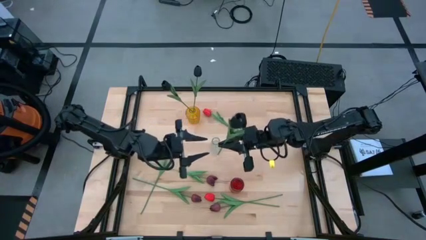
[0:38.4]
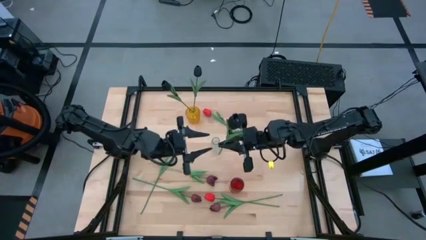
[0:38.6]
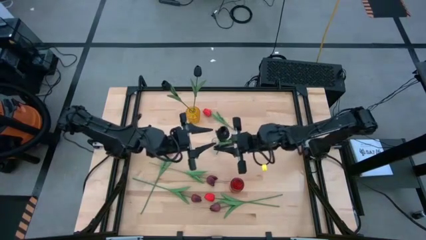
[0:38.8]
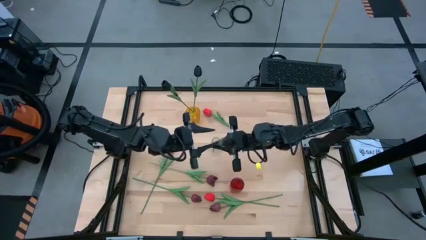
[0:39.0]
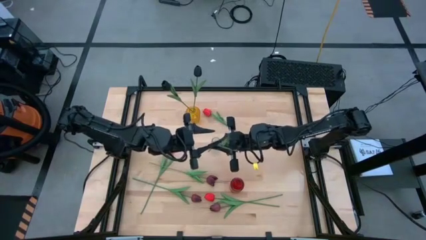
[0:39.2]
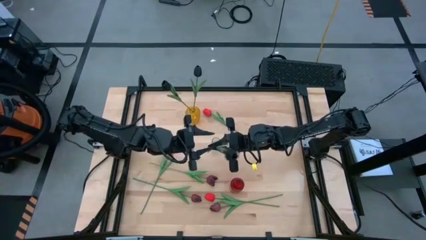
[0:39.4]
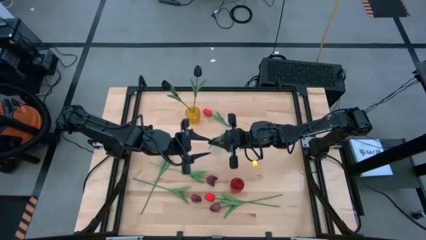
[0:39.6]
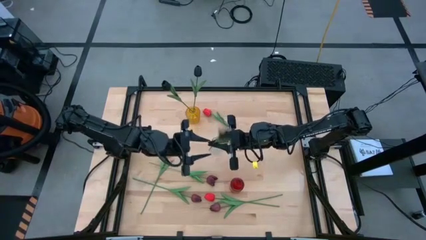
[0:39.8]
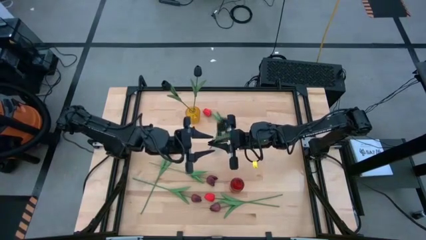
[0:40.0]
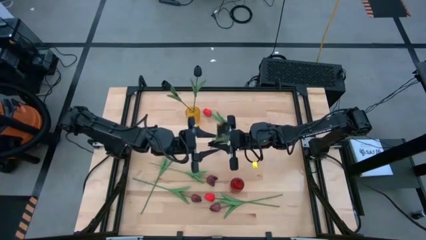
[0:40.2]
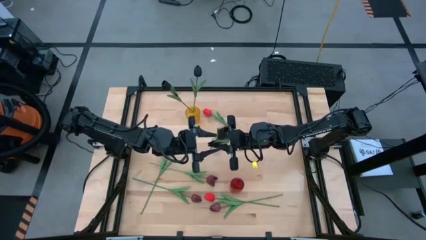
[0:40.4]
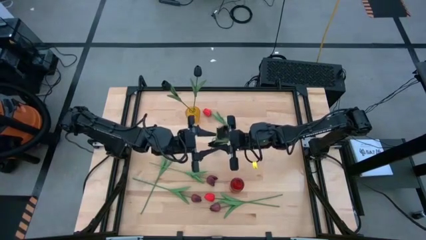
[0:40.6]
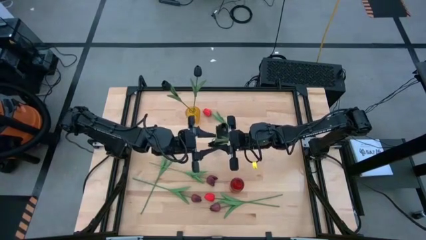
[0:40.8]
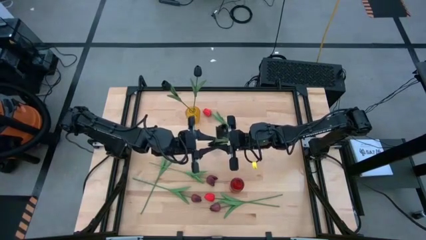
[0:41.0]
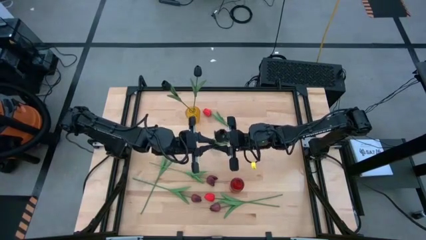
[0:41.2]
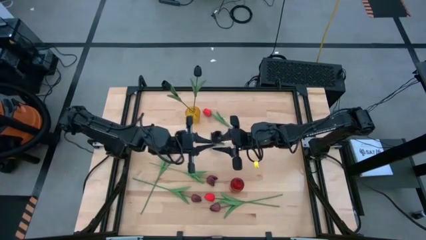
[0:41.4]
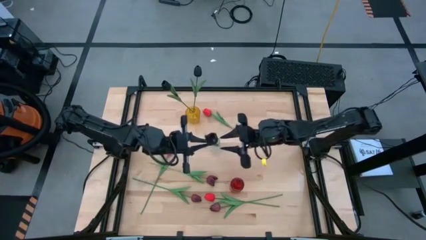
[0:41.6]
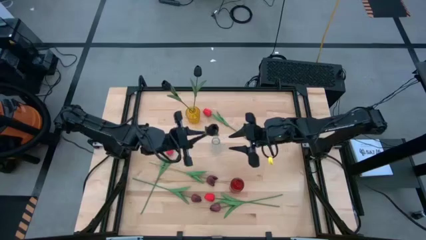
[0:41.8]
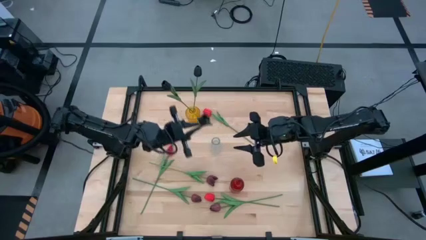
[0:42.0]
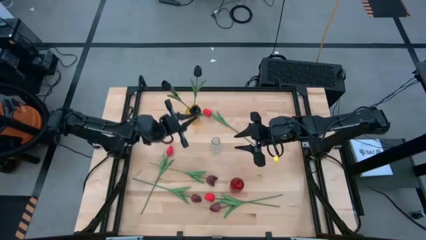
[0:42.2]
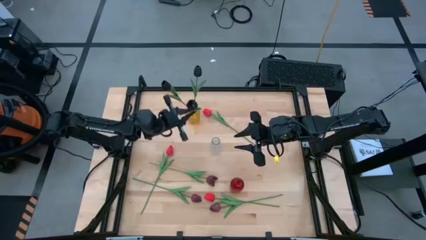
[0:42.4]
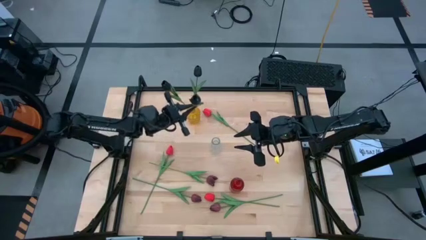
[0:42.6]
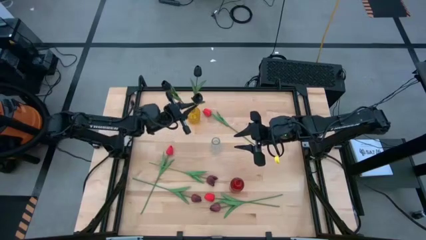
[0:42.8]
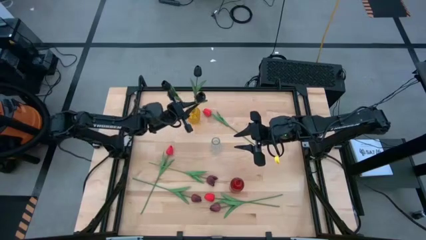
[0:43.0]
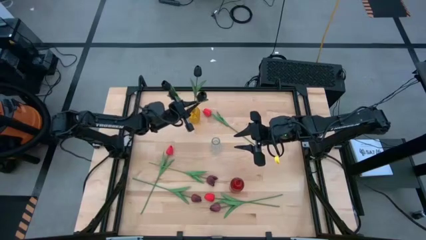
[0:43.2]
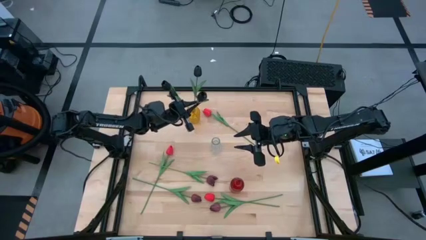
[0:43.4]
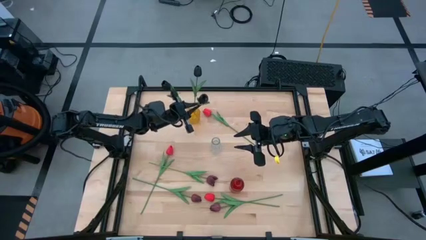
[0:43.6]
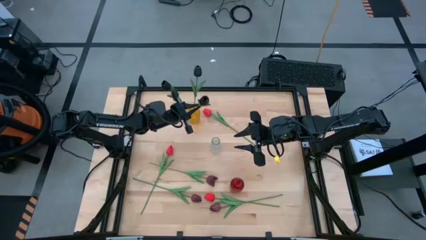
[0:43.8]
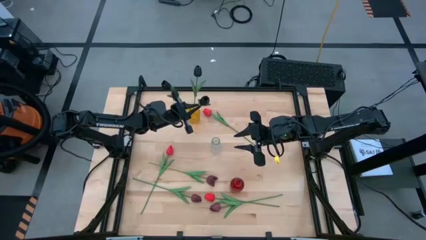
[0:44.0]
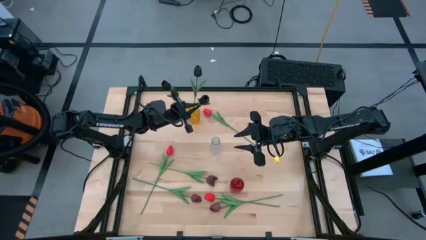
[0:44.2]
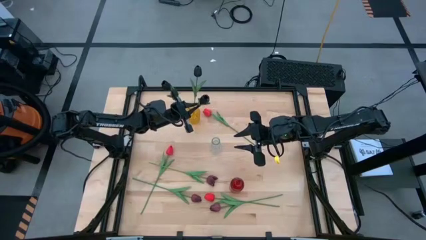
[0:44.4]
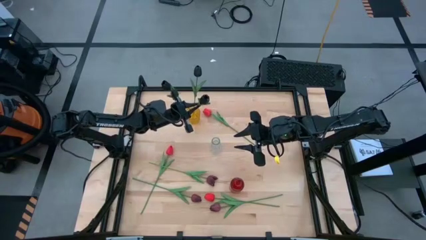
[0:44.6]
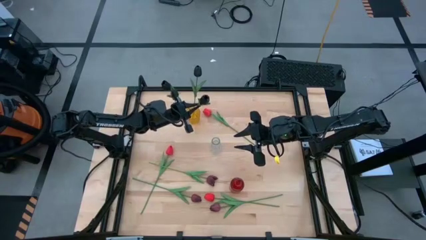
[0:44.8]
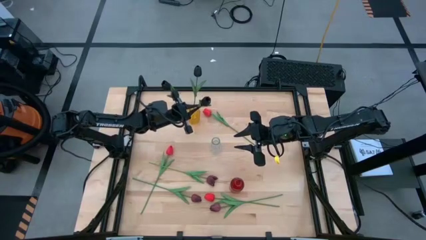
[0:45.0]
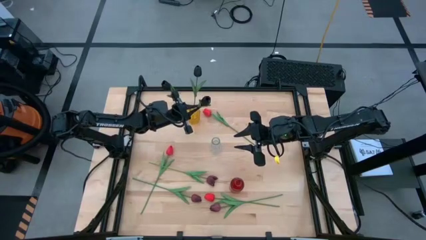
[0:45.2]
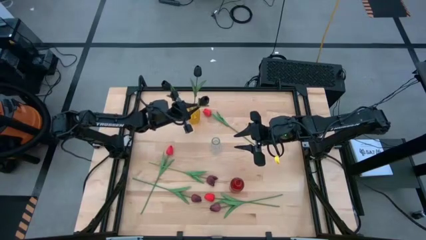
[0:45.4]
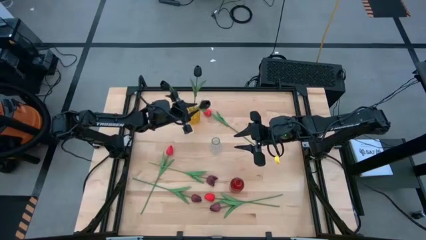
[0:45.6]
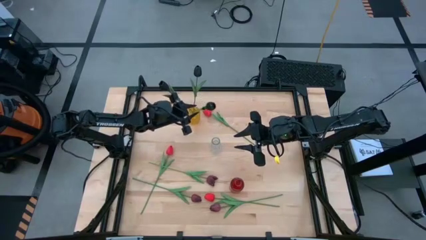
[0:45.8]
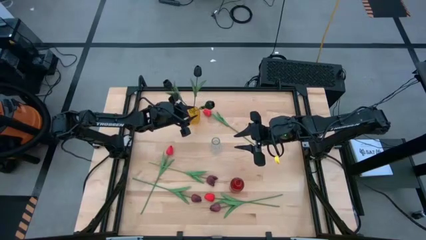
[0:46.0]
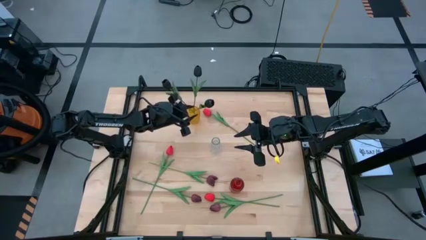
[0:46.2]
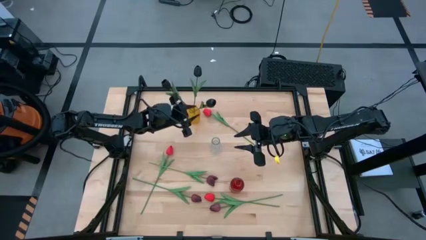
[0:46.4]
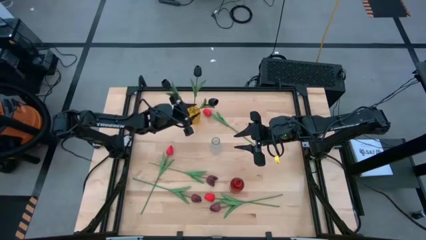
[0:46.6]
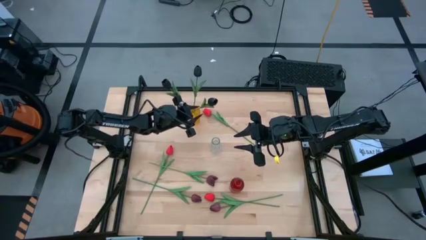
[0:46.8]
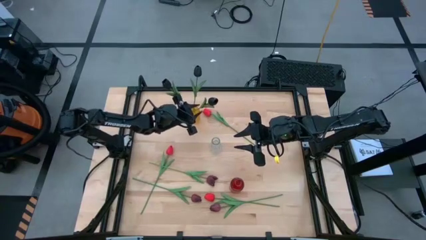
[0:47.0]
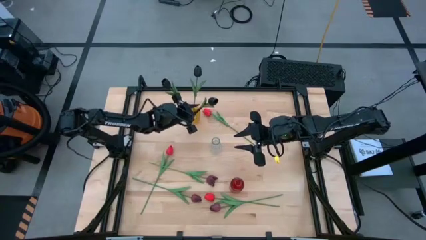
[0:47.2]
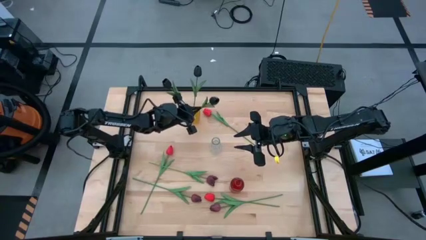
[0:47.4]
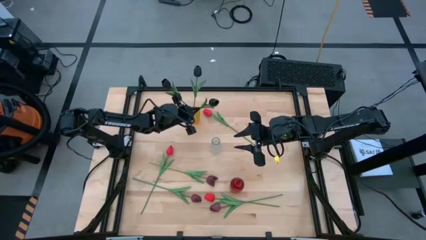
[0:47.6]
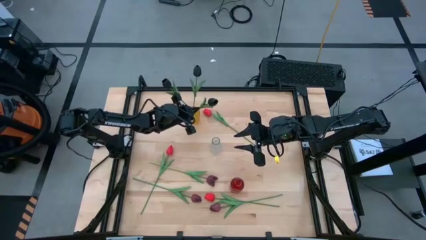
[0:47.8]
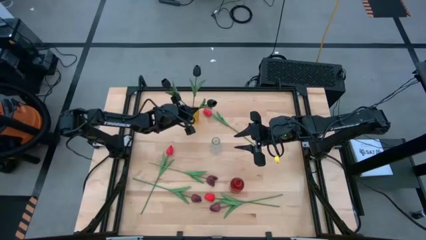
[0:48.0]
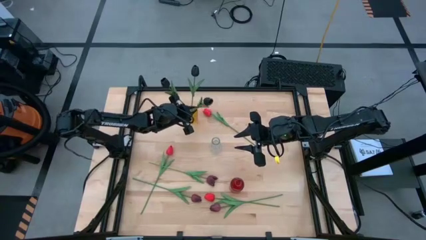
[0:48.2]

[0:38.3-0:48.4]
Task: Sort flowers into vase by color
Put the black tulip into the yellow vase

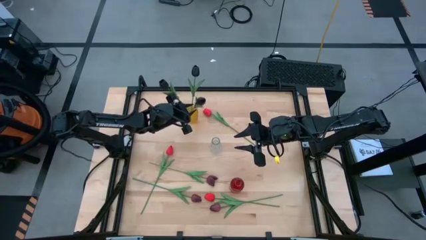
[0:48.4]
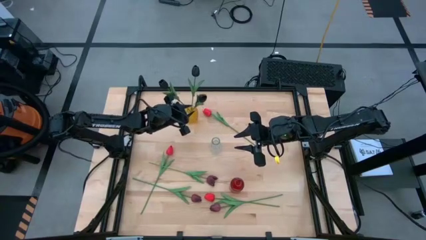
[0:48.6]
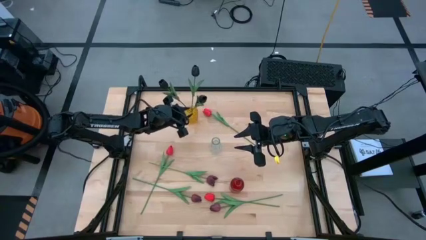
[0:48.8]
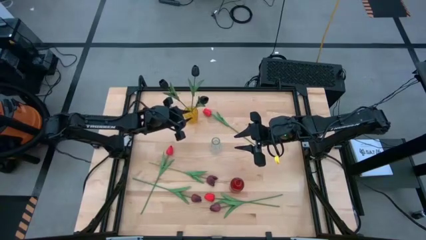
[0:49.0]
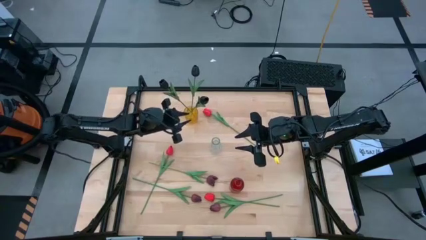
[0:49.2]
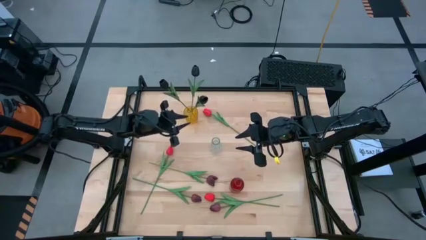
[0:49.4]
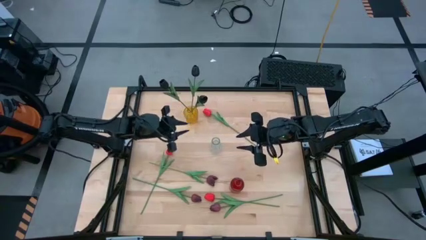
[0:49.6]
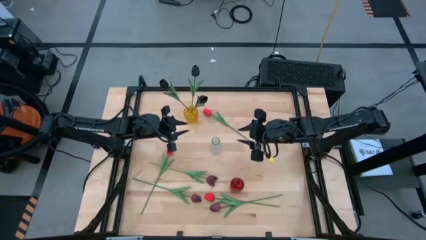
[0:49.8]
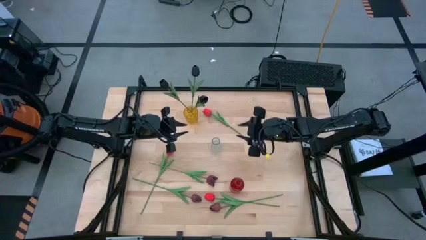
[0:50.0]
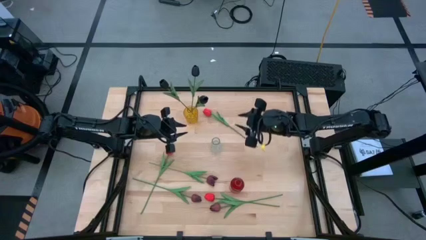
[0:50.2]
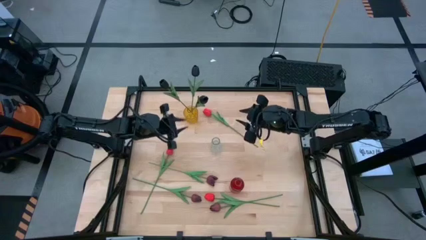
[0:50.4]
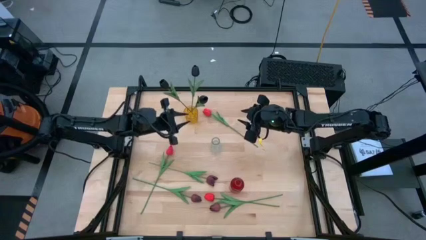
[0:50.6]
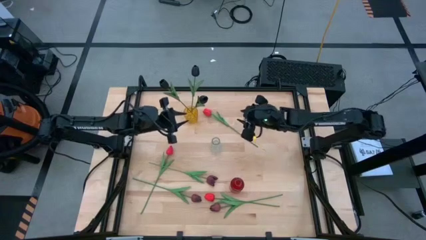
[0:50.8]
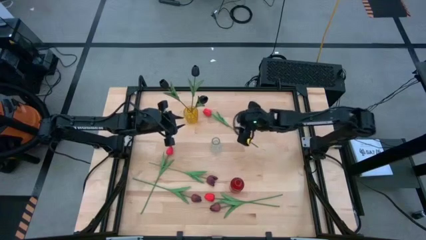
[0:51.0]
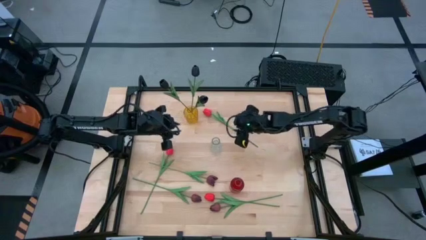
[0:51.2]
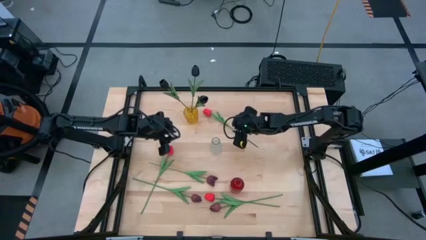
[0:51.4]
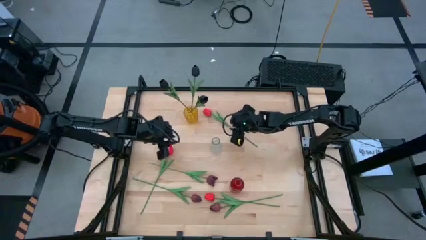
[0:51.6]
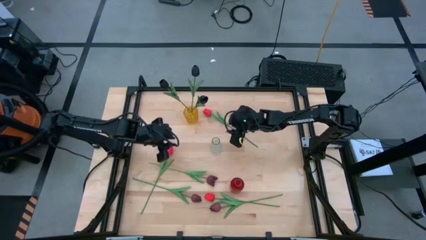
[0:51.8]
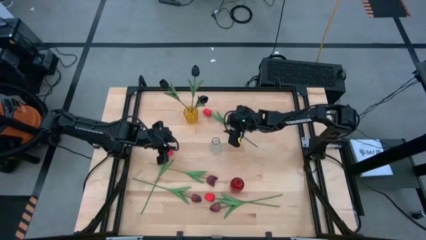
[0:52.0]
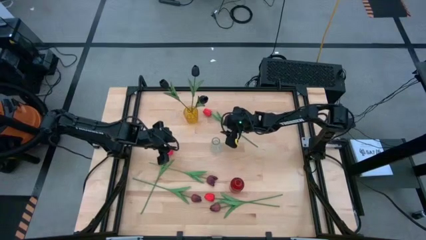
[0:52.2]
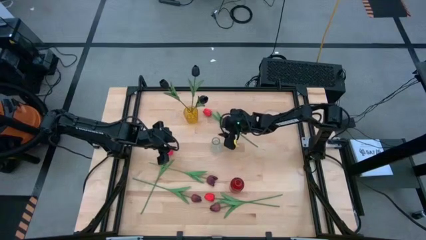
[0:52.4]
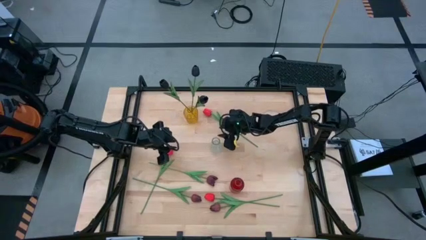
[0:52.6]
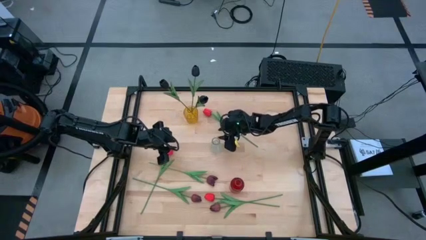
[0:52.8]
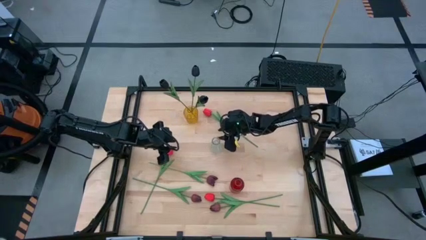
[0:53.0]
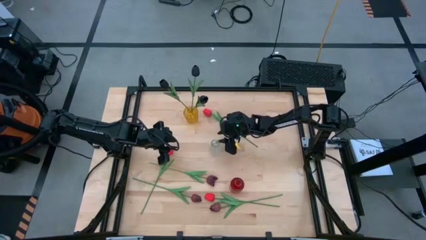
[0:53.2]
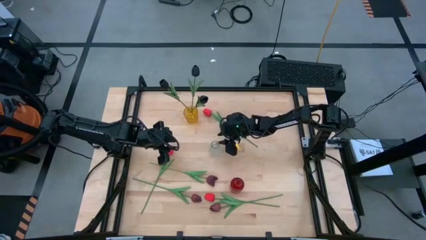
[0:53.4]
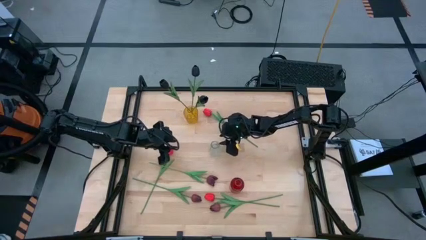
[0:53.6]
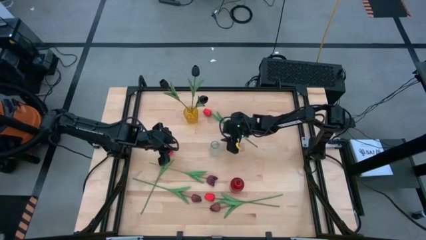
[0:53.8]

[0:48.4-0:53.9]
Adjust the transparent vase

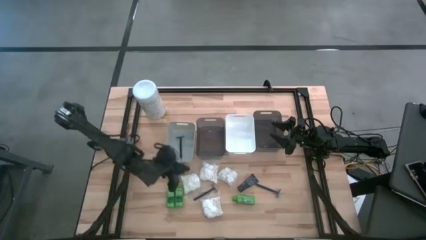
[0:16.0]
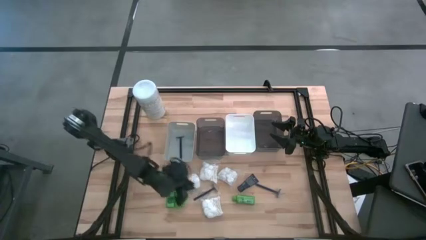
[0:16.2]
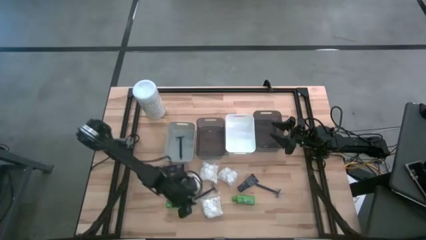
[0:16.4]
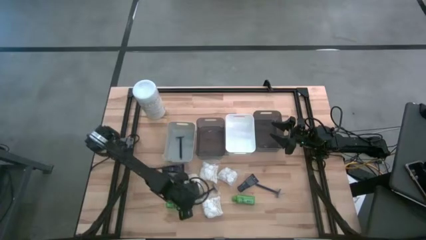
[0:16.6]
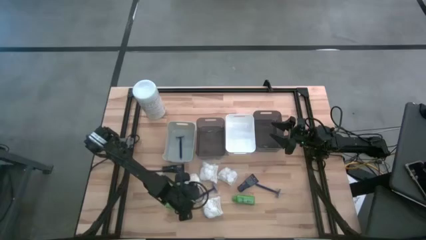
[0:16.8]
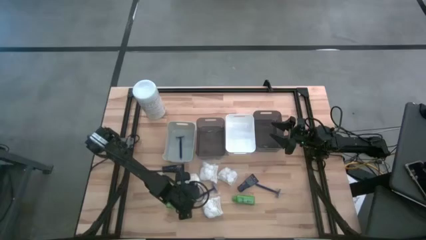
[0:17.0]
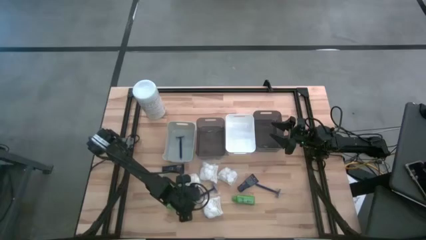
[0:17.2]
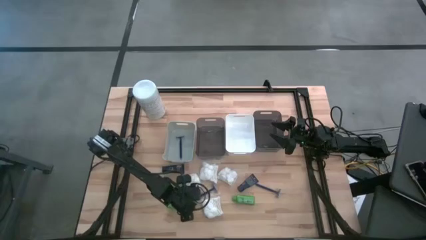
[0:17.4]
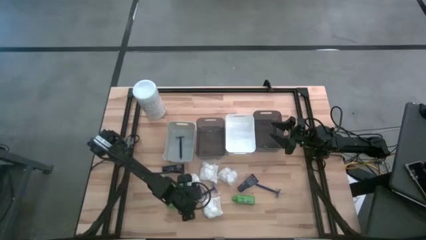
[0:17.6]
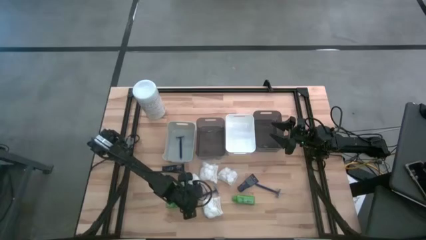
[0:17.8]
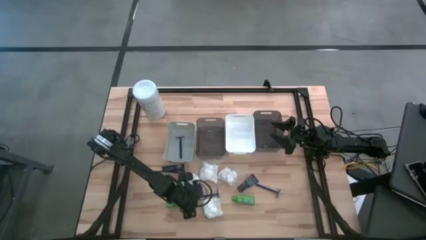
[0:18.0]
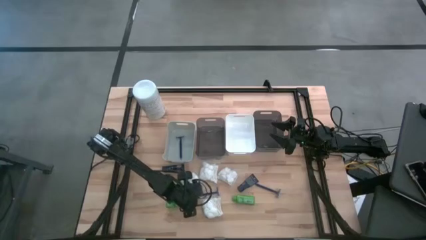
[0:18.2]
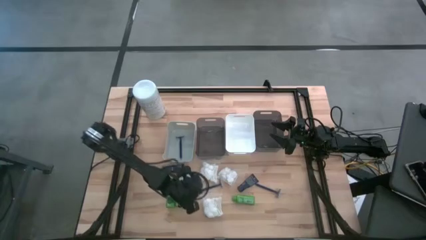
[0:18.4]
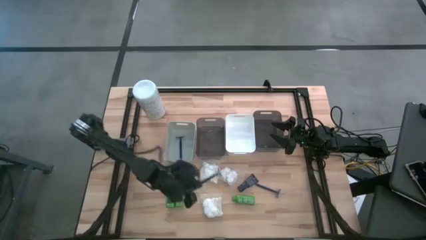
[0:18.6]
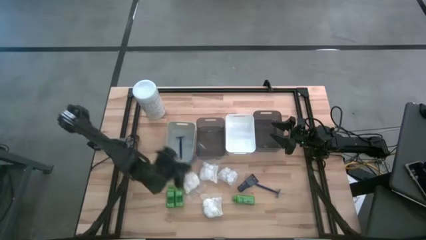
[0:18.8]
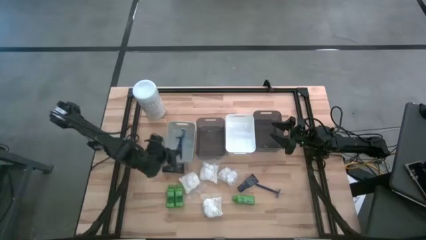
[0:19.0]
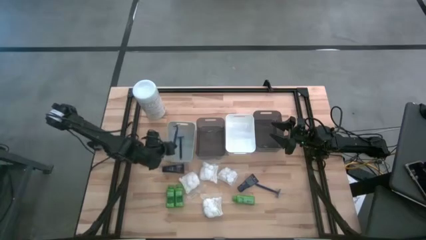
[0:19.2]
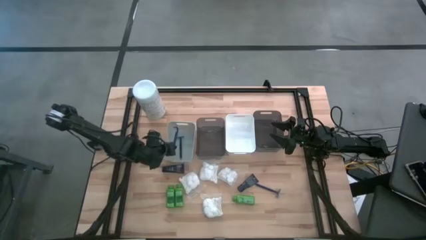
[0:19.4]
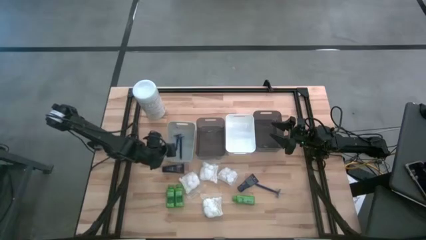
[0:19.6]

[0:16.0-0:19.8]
Task: Pick & Place Travel size toiletries
Put the left razor into the gray bin
